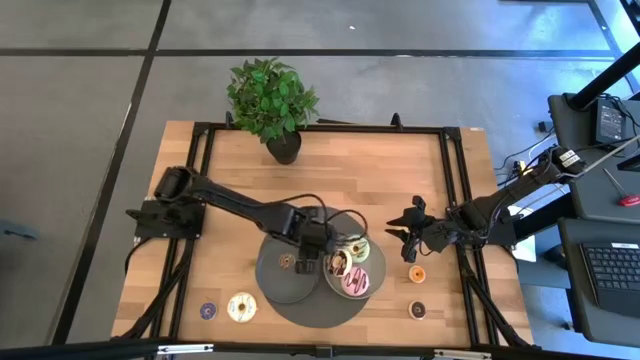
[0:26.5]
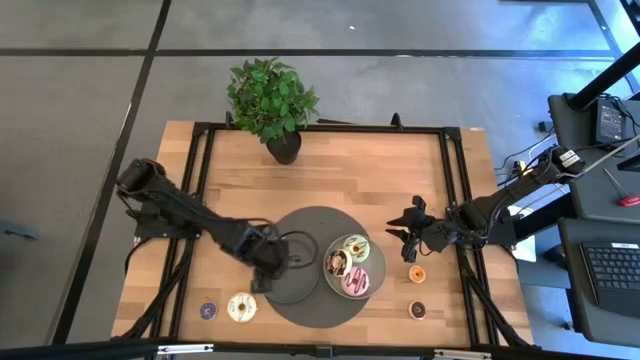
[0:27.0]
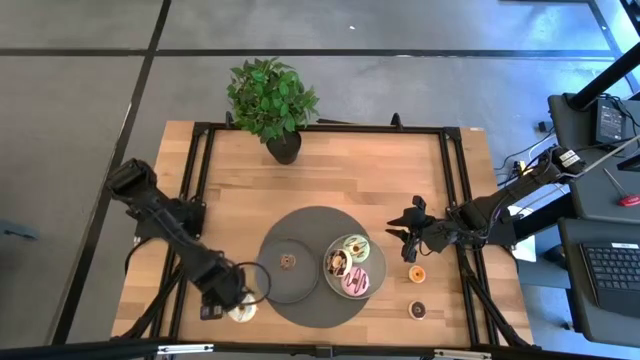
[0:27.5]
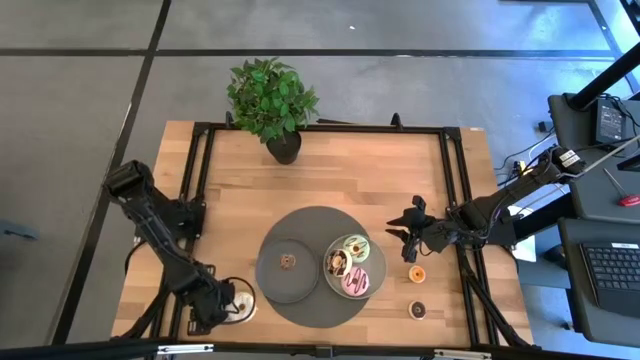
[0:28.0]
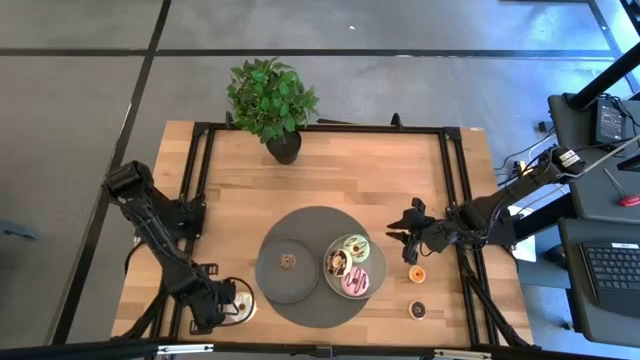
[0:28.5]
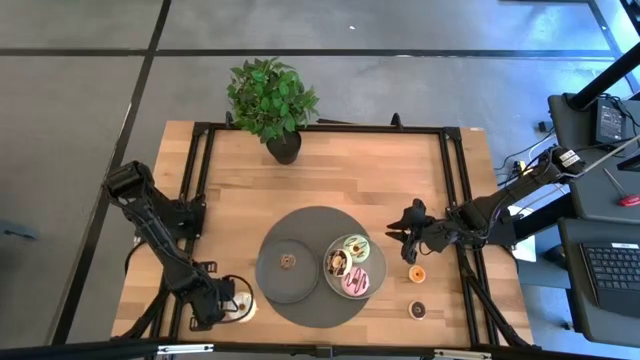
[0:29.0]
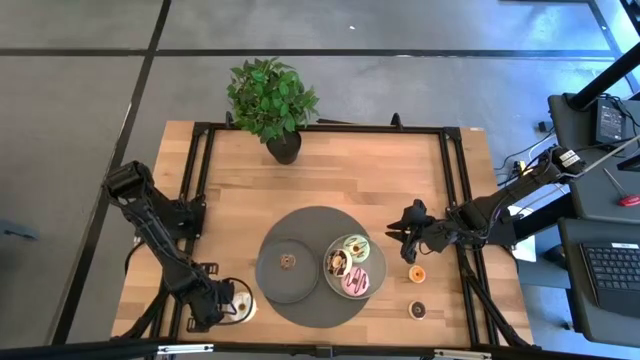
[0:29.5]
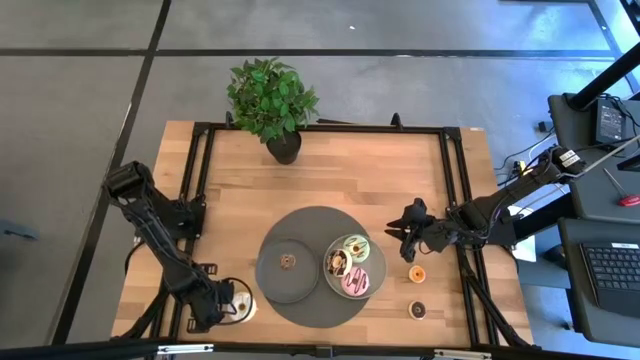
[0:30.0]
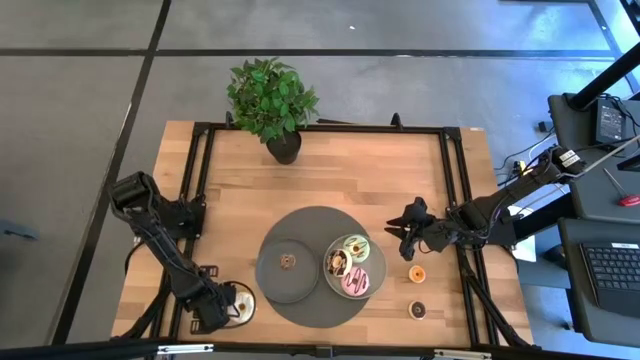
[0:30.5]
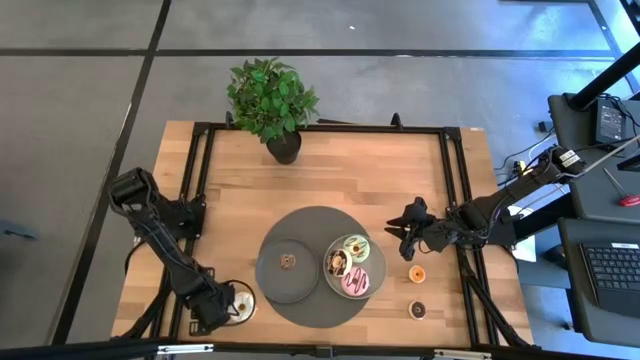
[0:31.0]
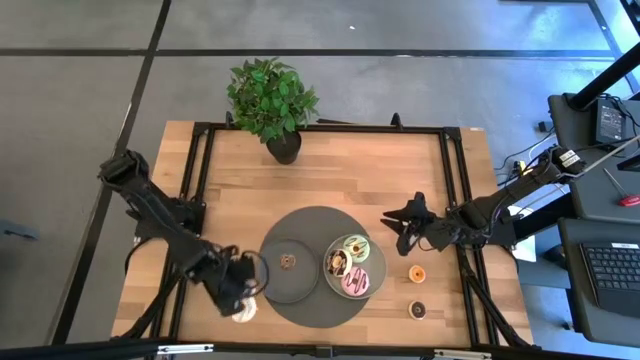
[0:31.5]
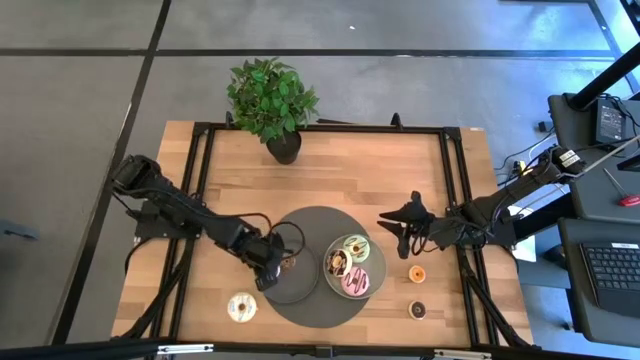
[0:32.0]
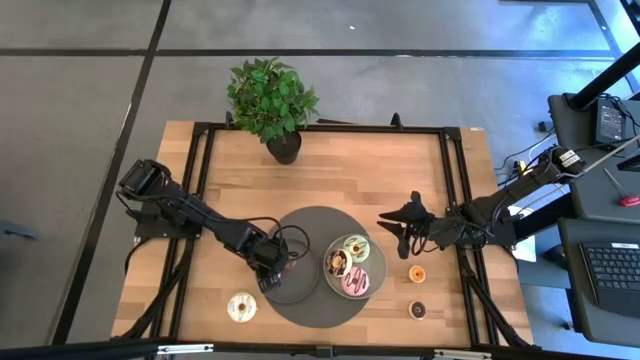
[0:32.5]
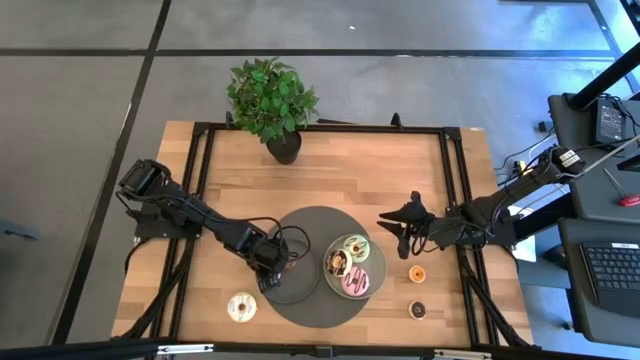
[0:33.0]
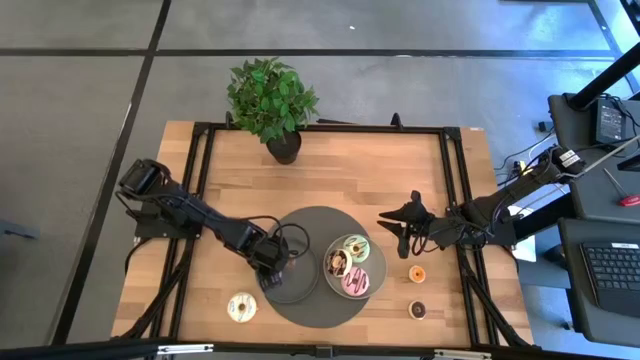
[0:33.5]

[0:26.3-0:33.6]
Task: Pick & Place donuts
Put the violet donut on the dark gray plate

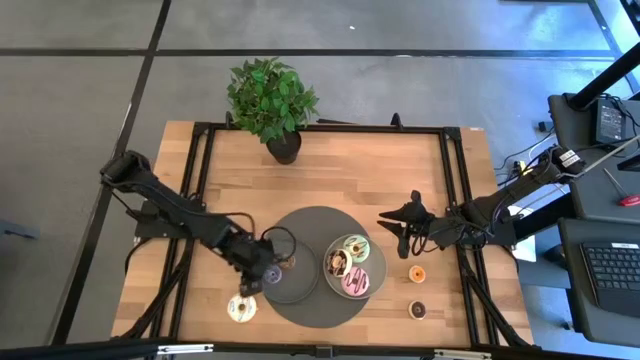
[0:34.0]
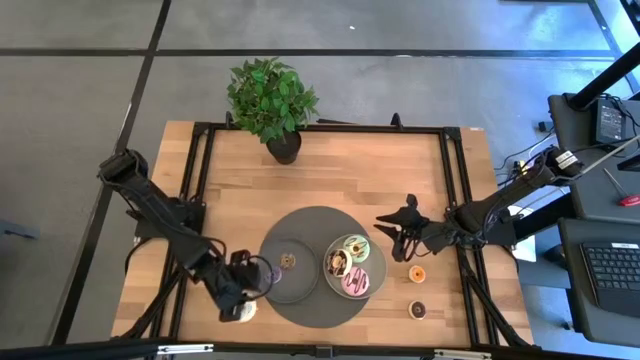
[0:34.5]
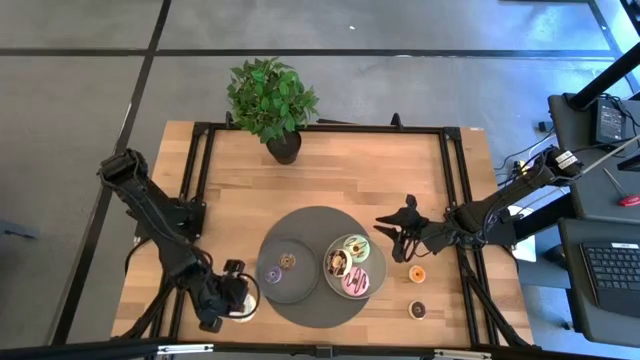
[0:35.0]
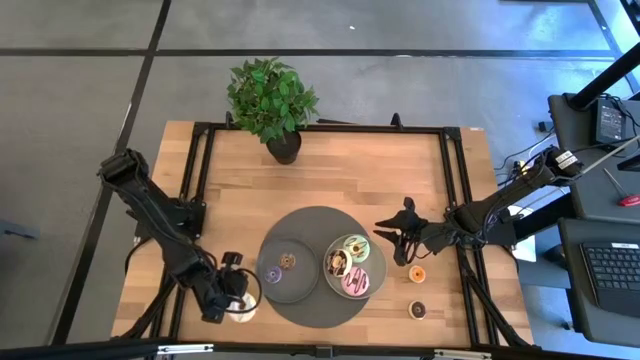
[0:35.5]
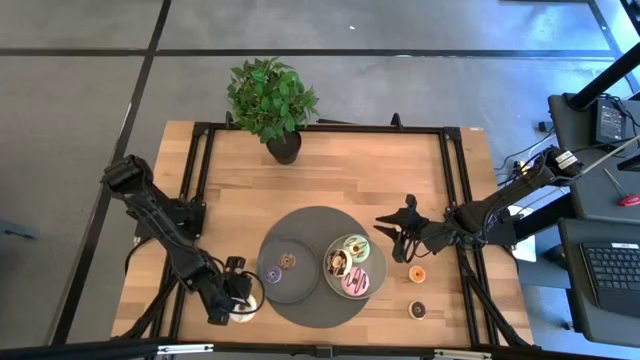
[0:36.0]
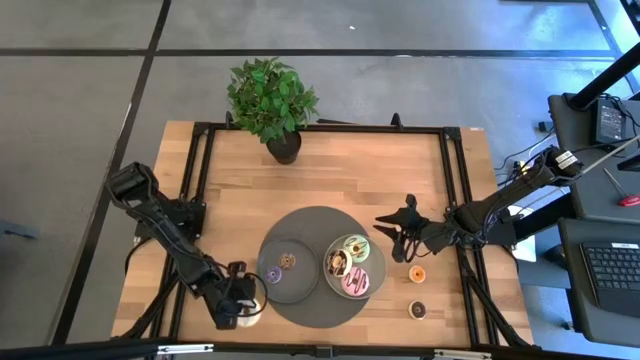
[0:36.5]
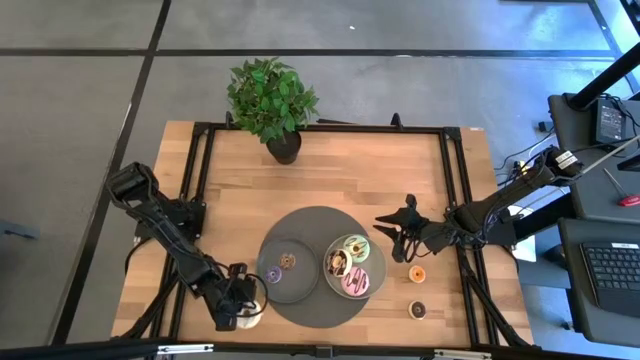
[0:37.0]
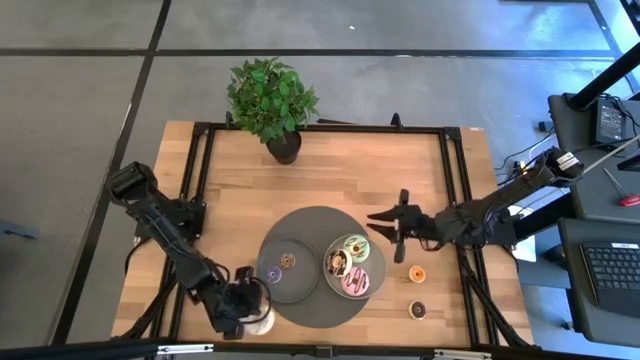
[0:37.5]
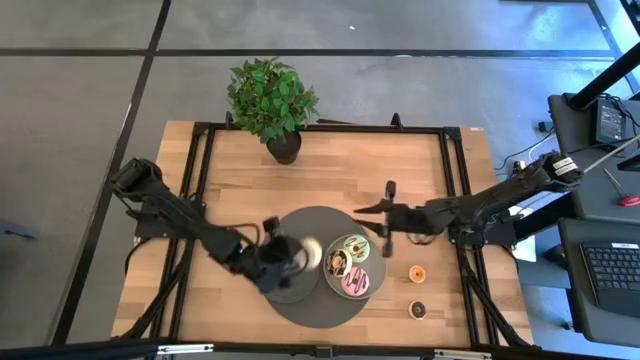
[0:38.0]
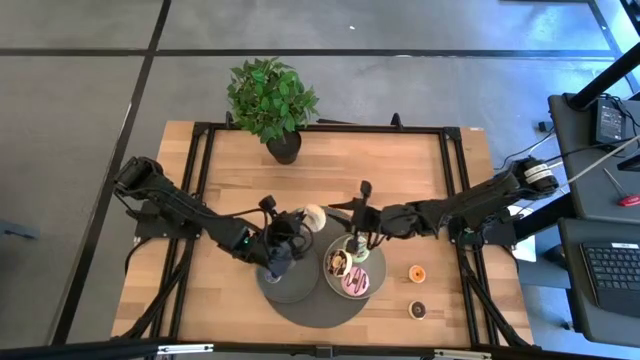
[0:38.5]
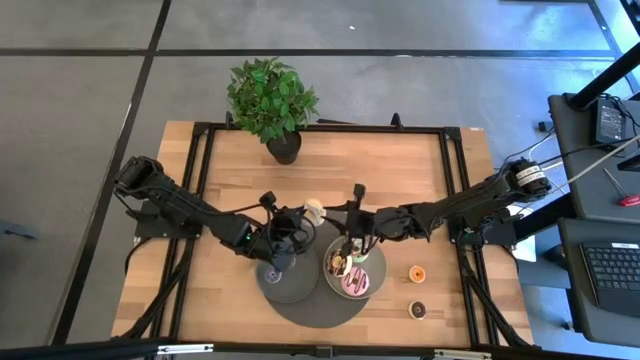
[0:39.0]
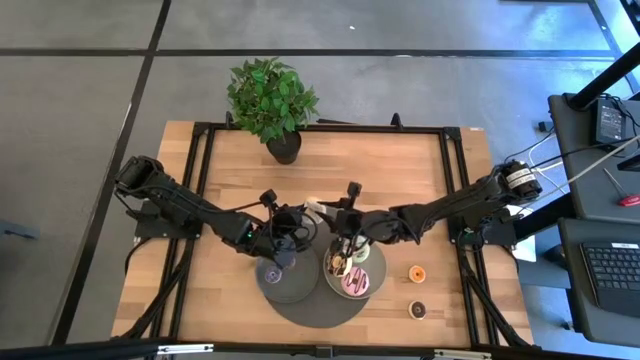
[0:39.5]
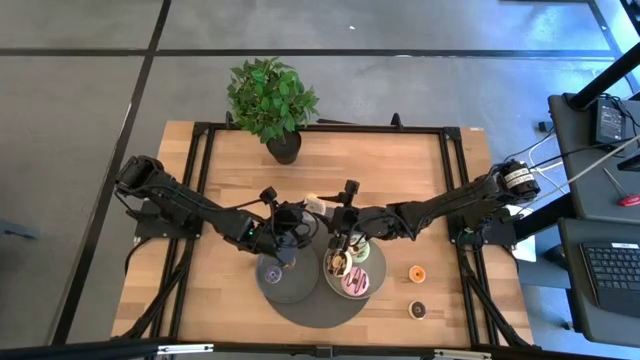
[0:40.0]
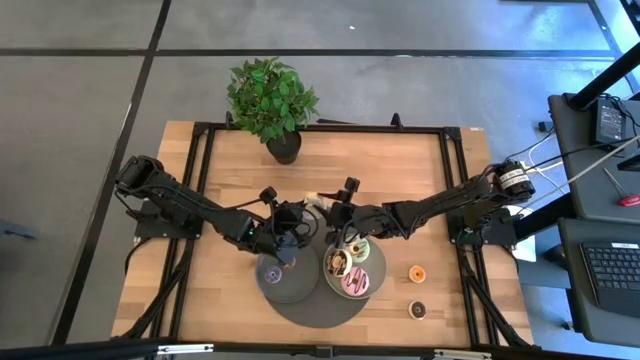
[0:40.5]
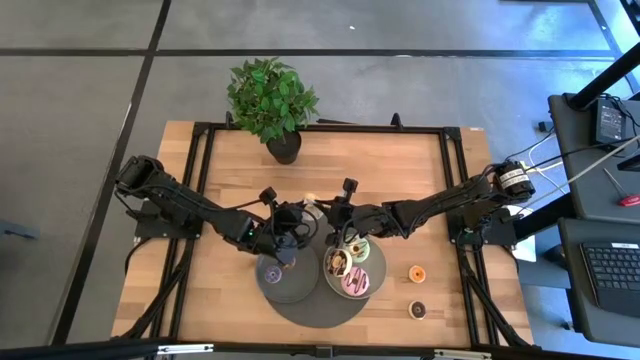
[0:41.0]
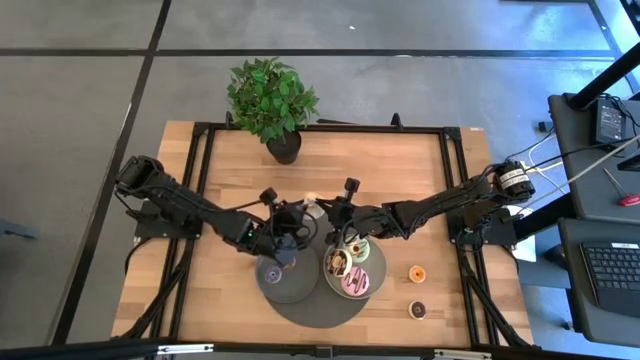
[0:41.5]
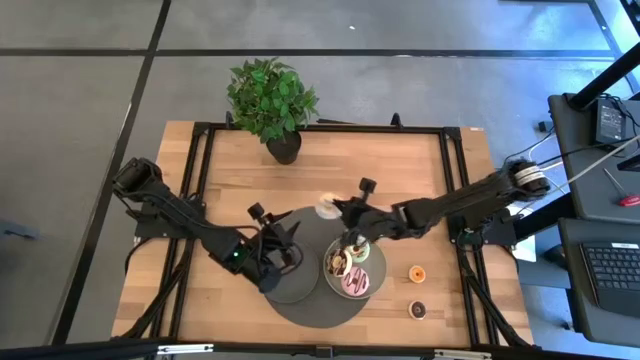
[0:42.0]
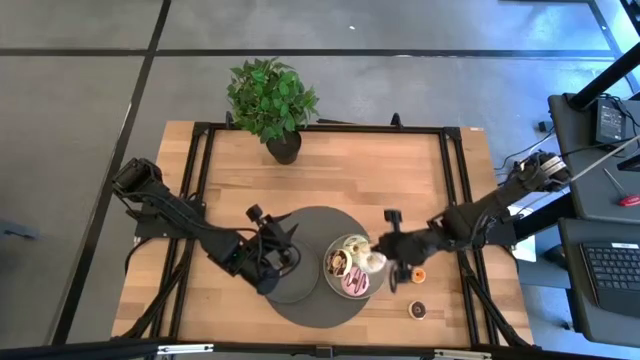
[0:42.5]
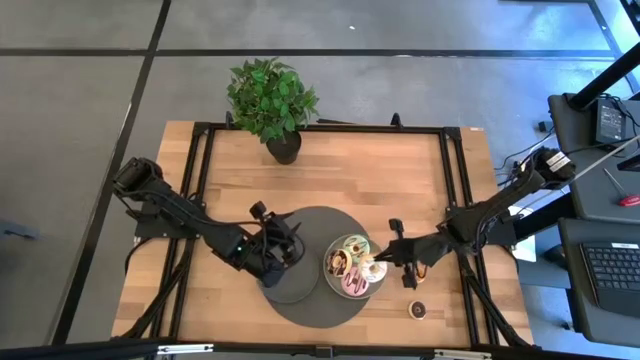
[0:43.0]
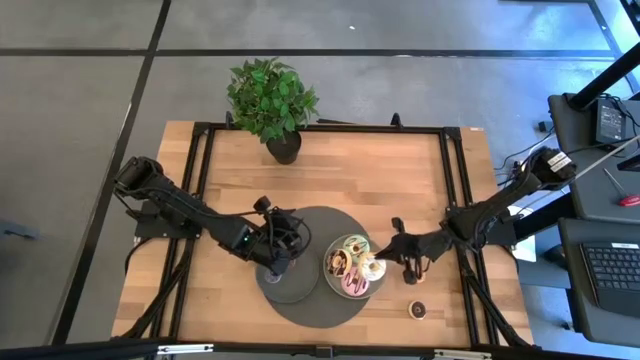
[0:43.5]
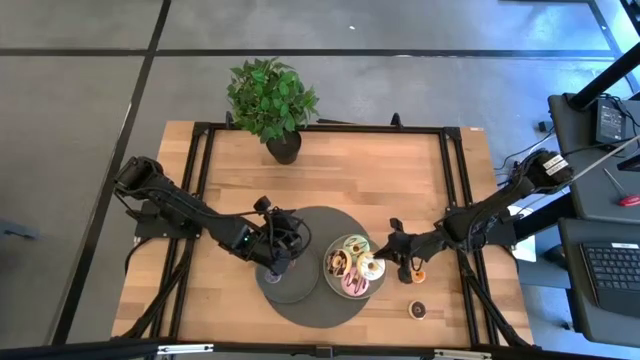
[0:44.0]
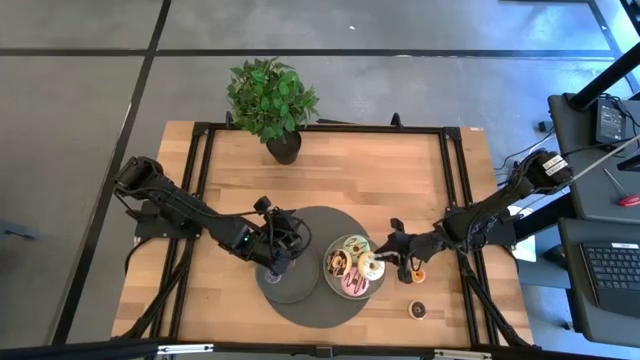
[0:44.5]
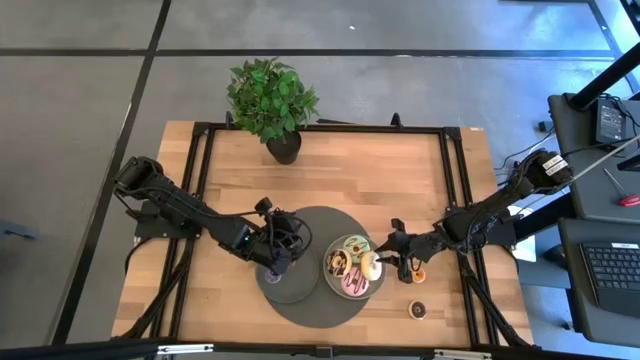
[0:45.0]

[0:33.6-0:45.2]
Put the white donut on the light gray plate

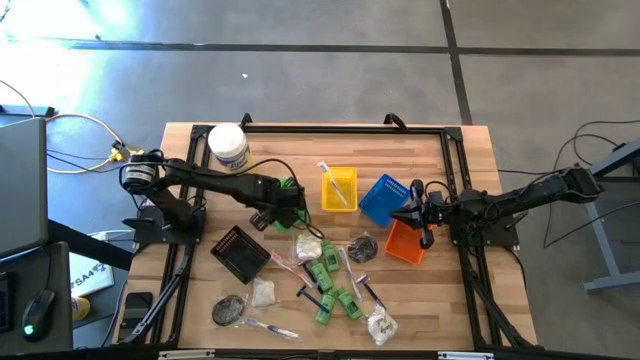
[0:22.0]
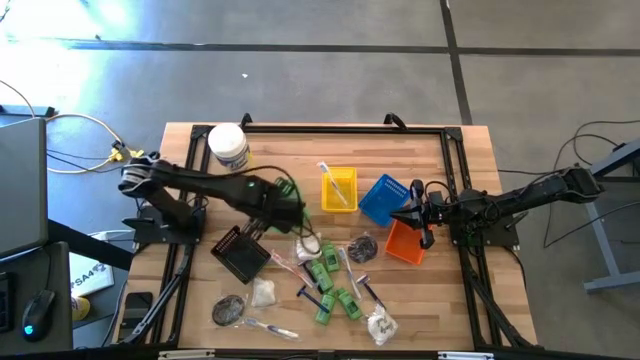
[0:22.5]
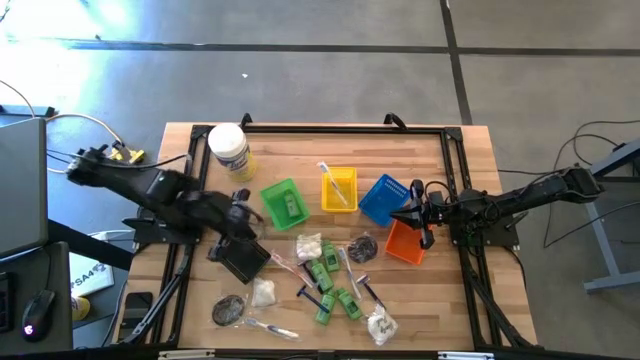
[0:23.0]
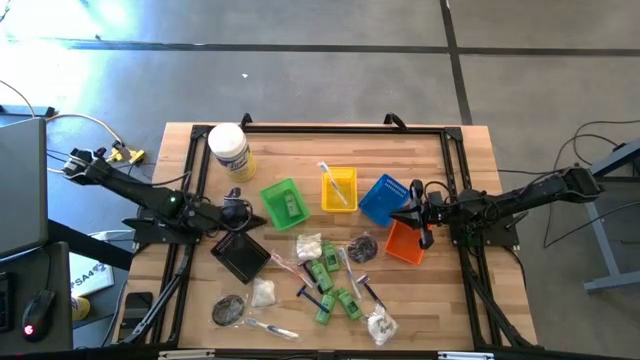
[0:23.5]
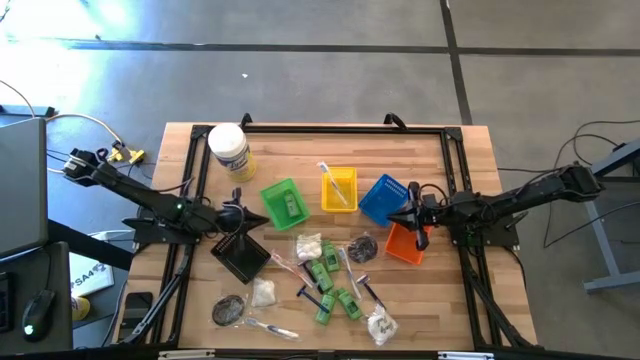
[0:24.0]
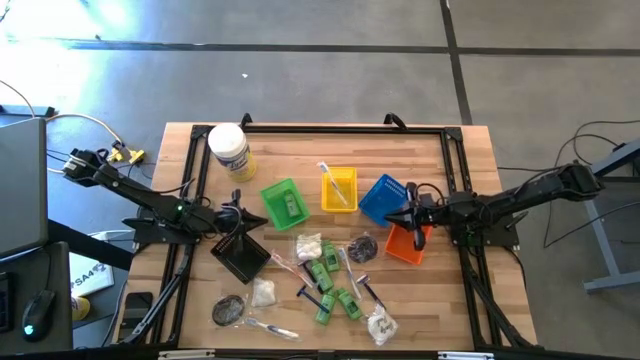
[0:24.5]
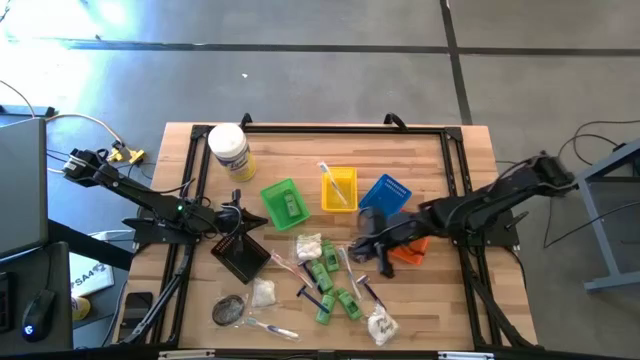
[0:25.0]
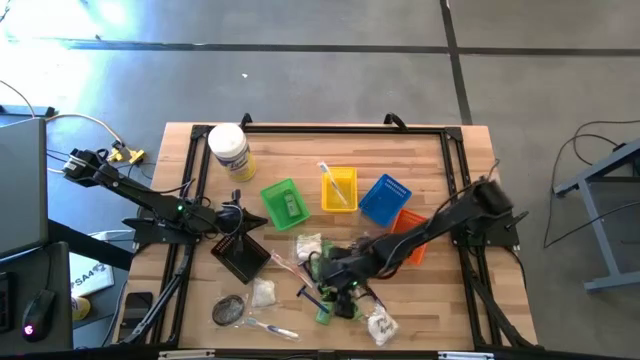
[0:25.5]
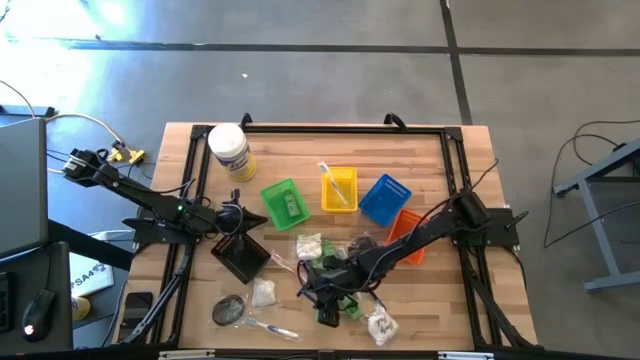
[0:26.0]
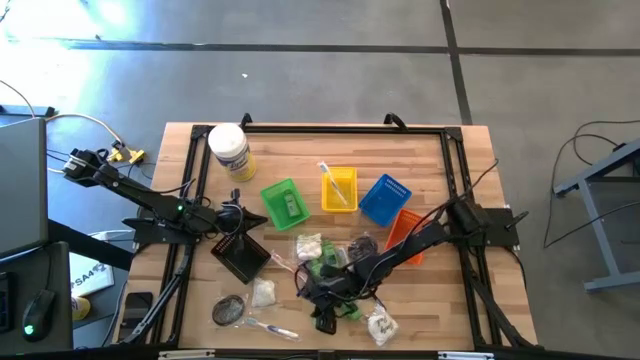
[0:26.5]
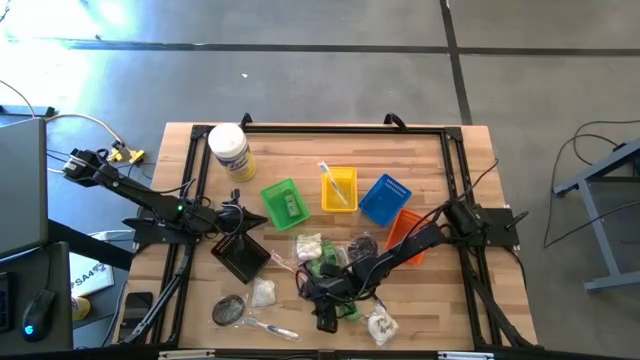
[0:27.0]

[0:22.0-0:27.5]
Task: Pick & Place Travel size toiletries
Put the bottom left razor into the black bin
